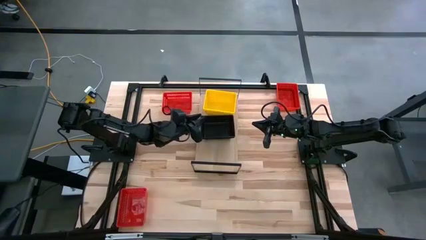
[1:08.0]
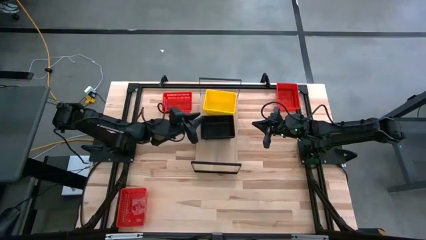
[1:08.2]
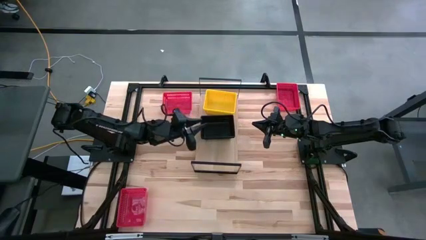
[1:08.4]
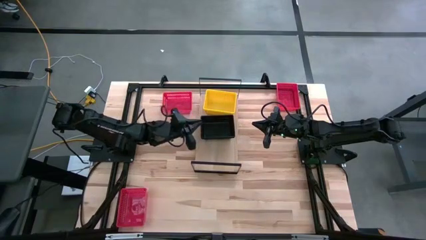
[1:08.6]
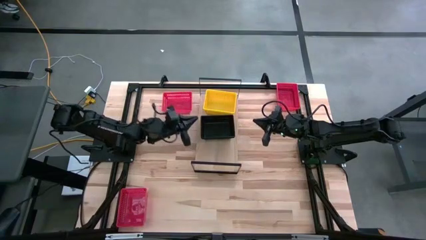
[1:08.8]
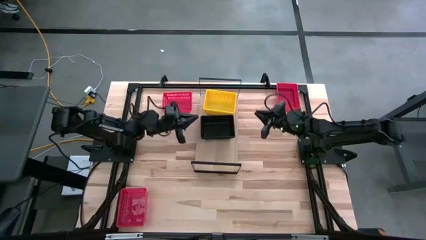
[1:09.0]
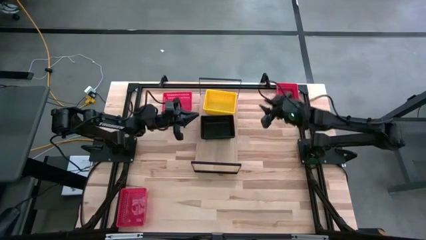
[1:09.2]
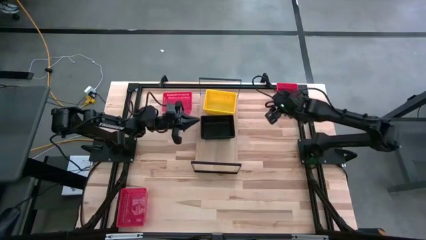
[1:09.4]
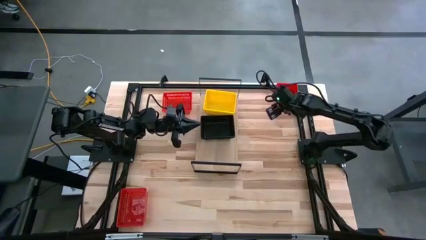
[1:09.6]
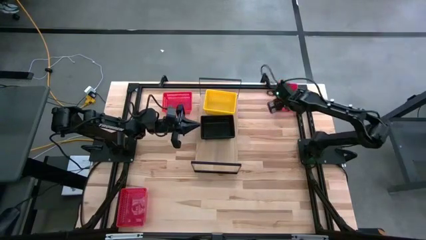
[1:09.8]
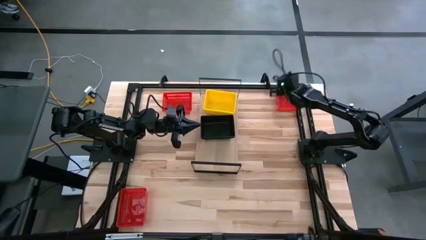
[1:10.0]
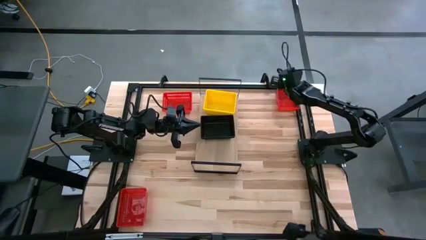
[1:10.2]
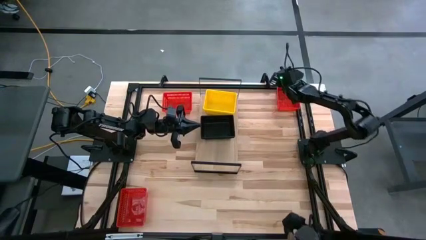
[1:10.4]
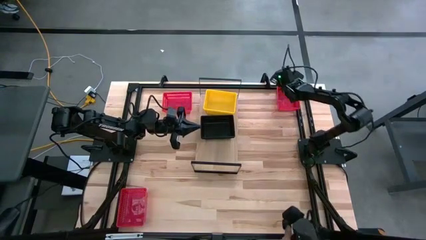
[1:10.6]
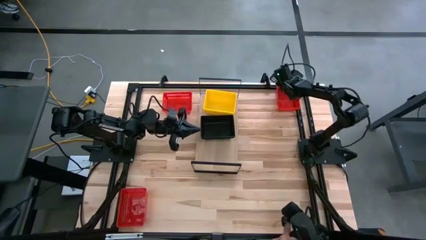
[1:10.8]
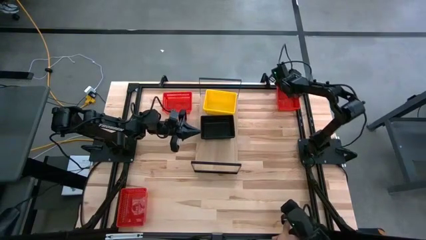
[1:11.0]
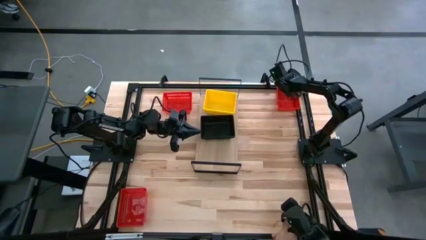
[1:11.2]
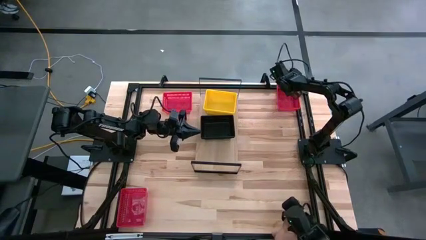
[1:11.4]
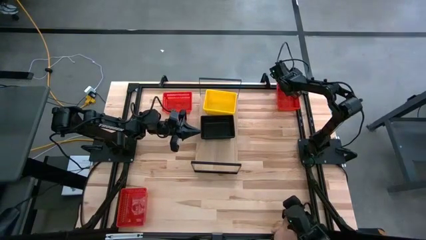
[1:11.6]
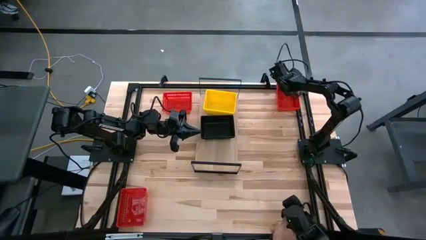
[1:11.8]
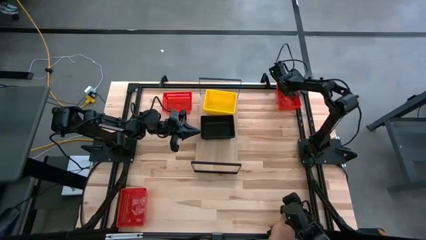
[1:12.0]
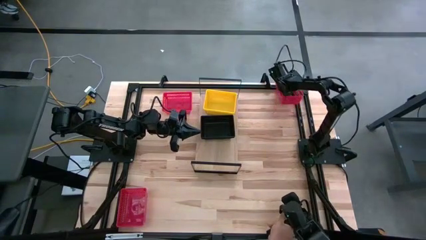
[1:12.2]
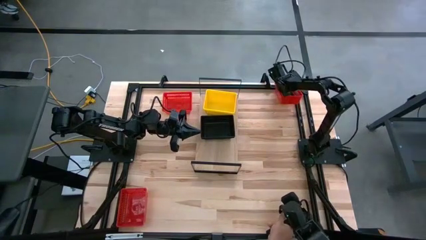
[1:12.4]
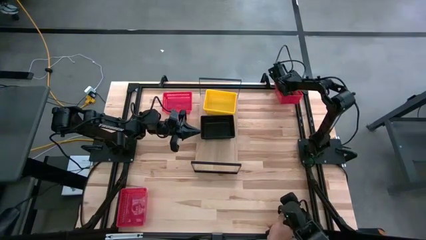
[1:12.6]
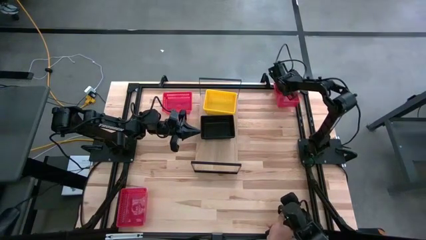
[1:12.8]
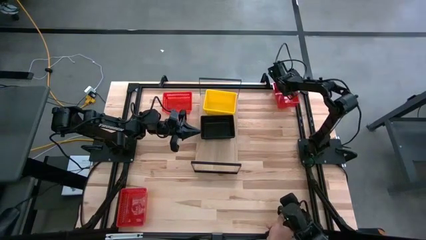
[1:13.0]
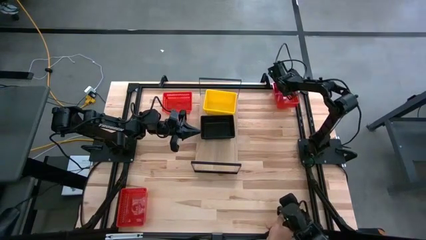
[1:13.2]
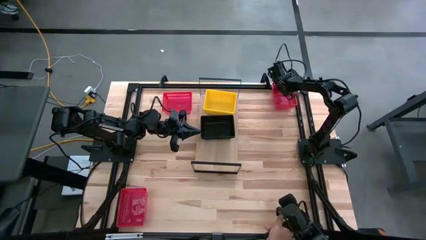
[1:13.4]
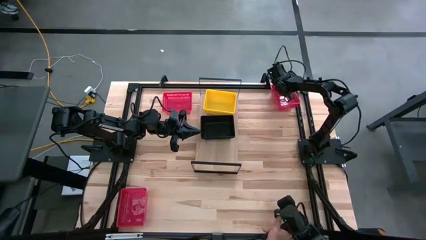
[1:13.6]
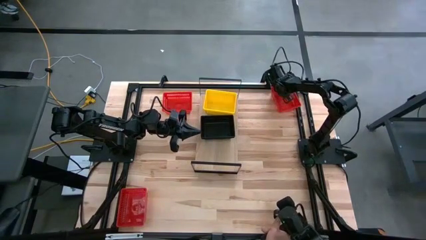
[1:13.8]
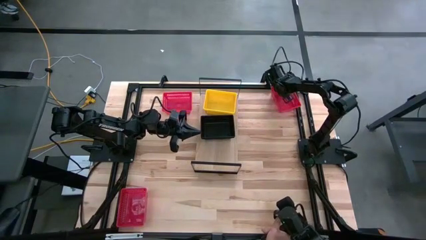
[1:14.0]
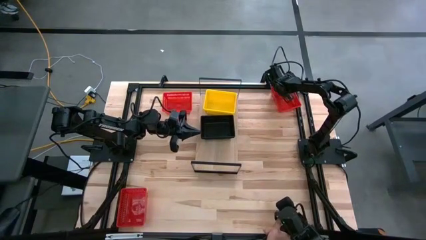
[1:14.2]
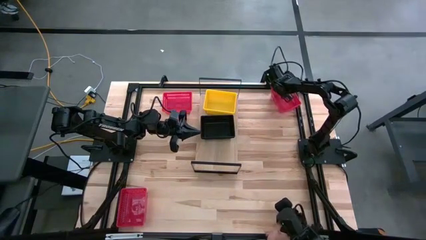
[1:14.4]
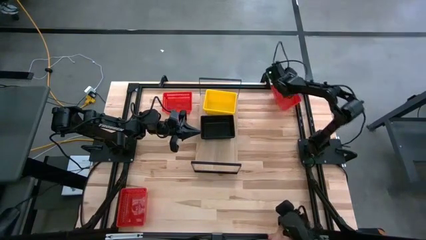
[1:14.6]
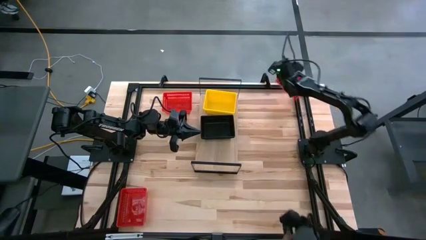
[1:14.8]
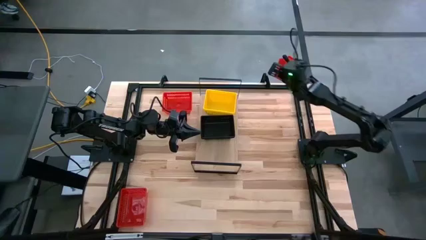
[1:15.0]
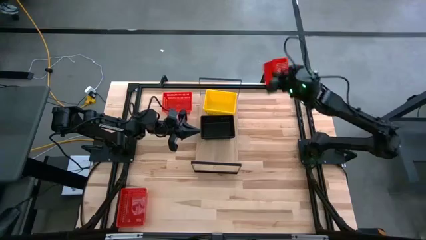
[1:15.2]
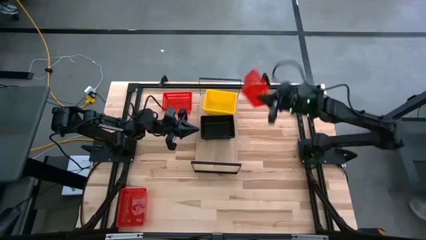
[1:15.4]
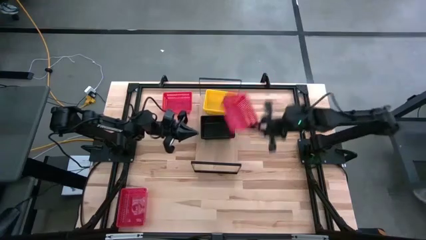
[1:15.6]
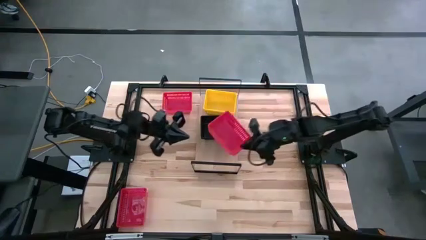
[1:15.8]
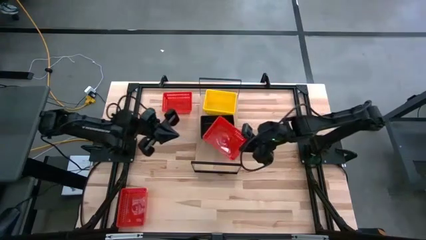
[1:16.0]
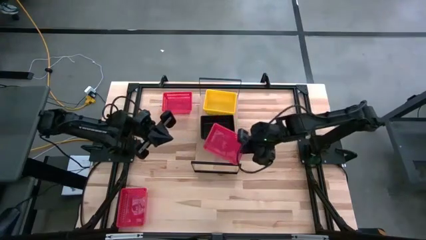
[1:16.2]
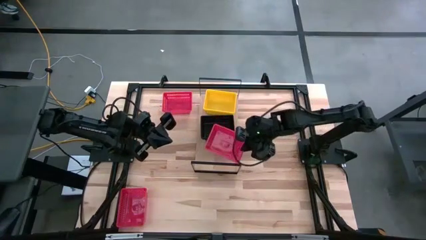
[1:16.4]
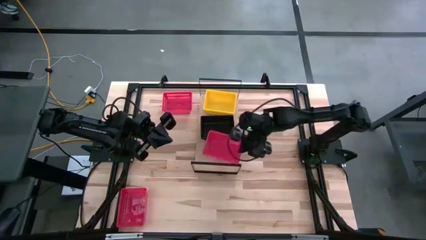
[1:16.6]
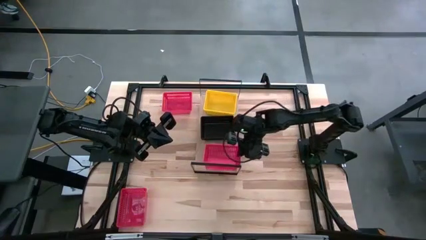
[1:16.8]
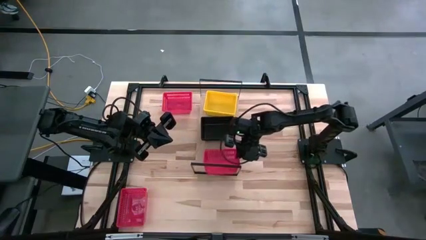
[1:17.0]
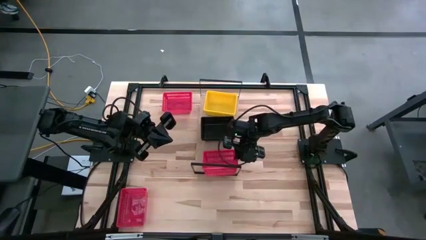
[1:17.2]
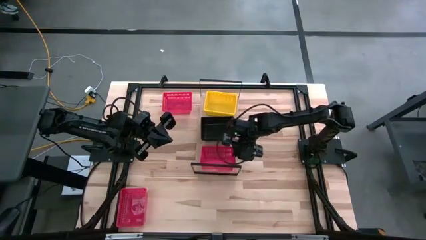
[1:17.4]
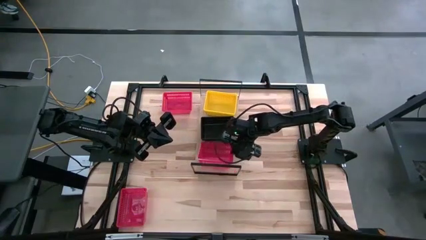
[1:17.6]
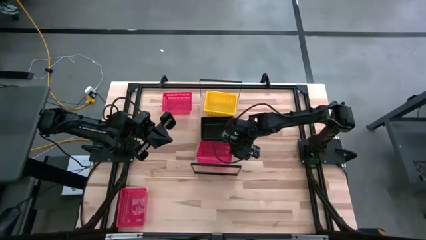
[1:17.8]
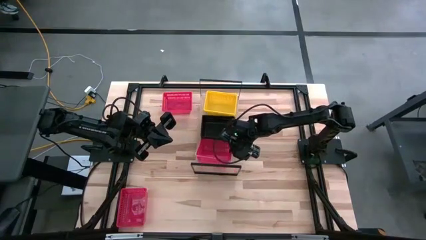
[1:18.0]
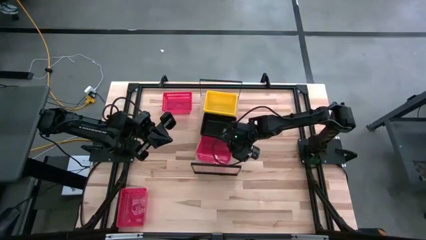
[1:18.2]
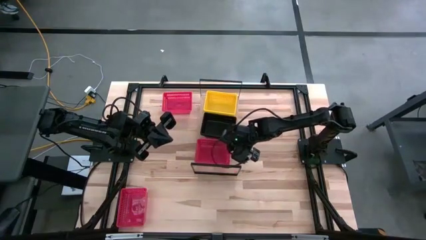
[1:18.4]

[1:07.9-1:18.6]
Task: Stack baskets on shelf by color
Put the top right red bin on the shelf

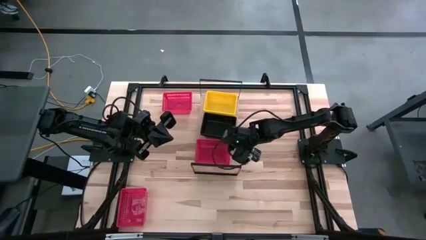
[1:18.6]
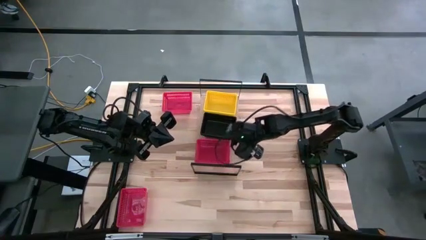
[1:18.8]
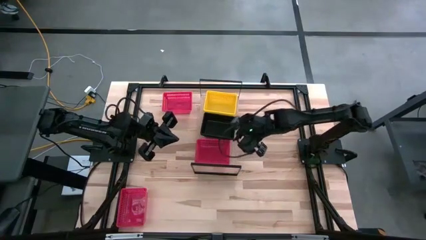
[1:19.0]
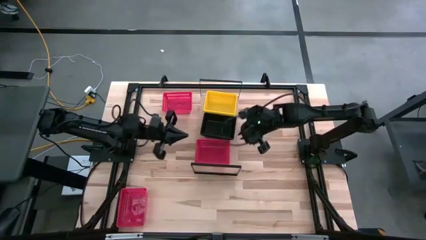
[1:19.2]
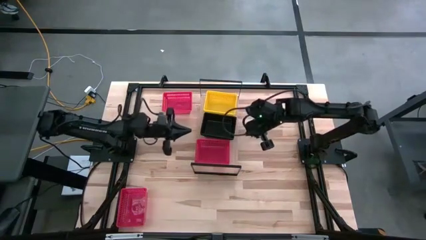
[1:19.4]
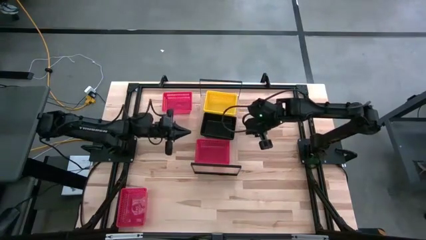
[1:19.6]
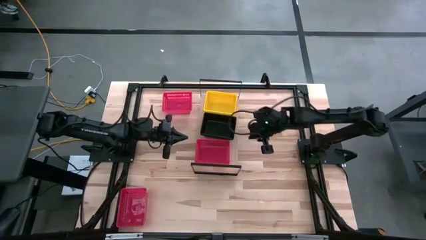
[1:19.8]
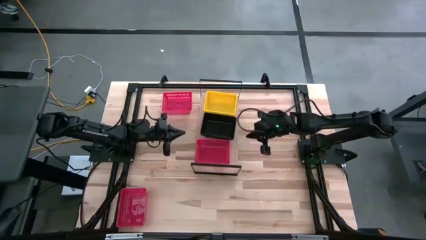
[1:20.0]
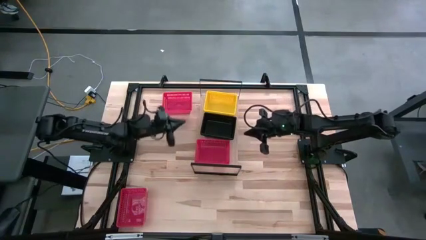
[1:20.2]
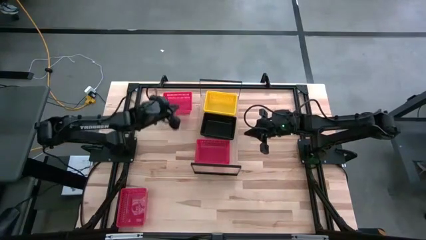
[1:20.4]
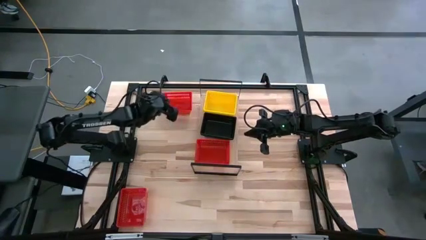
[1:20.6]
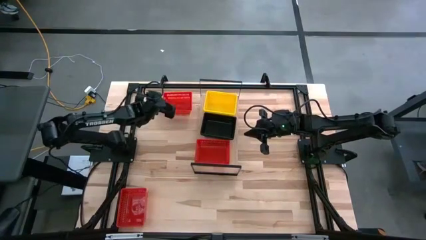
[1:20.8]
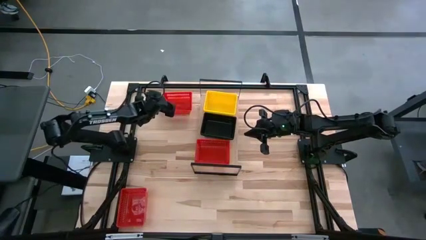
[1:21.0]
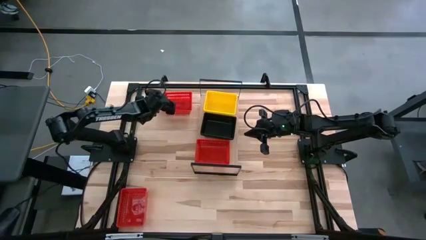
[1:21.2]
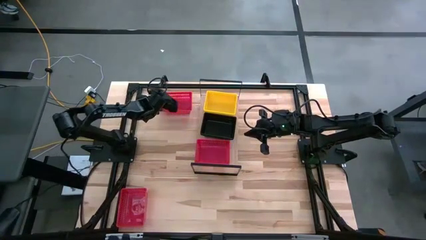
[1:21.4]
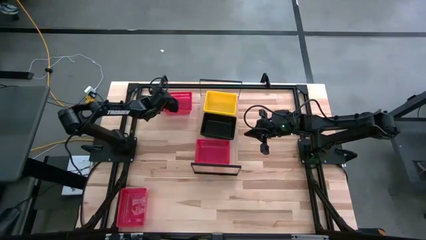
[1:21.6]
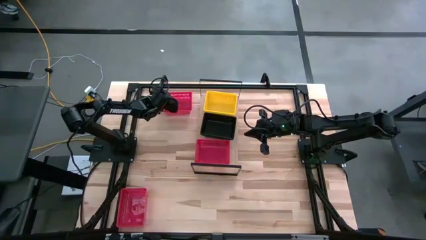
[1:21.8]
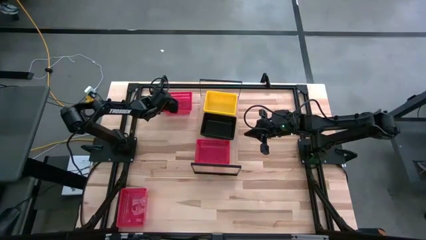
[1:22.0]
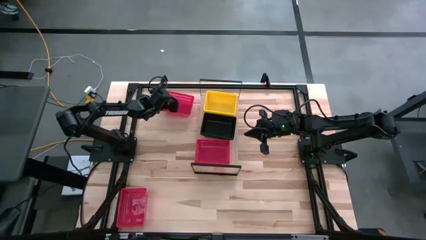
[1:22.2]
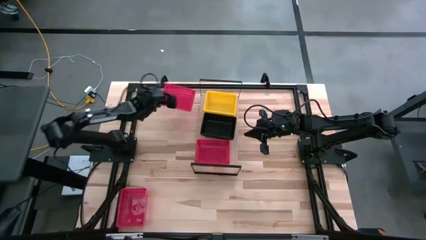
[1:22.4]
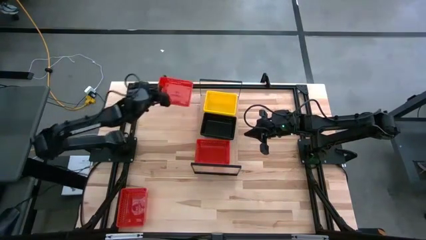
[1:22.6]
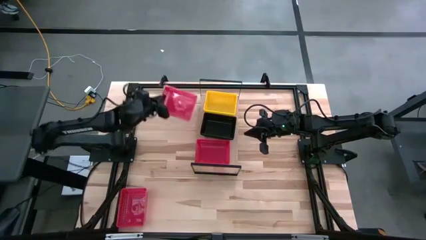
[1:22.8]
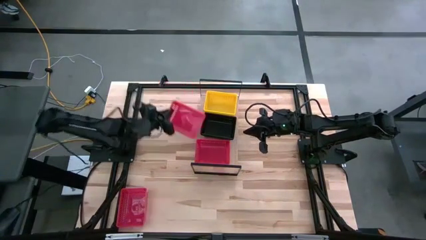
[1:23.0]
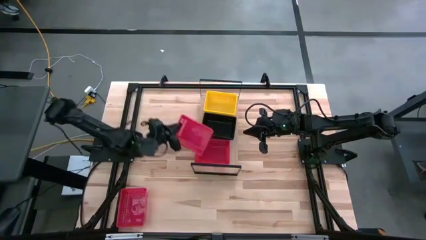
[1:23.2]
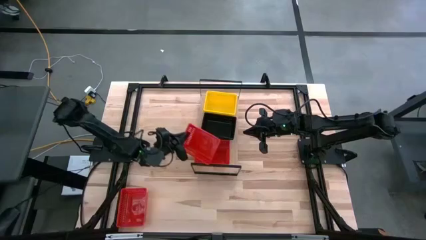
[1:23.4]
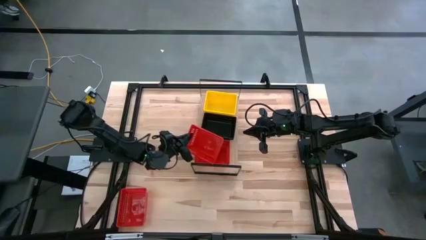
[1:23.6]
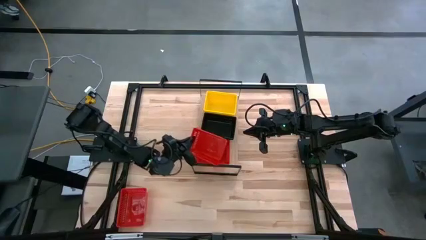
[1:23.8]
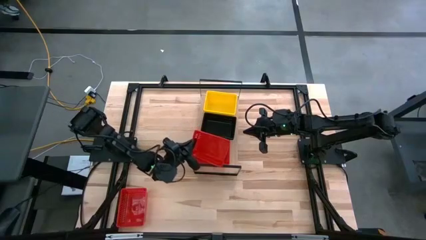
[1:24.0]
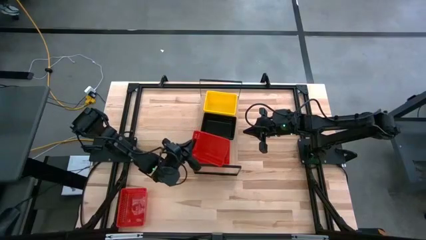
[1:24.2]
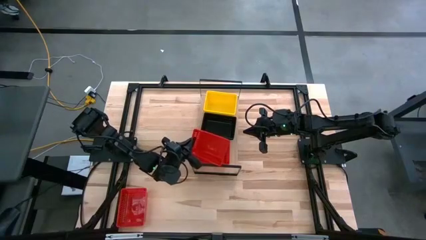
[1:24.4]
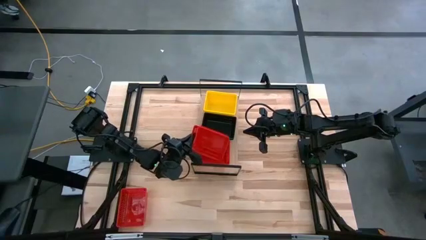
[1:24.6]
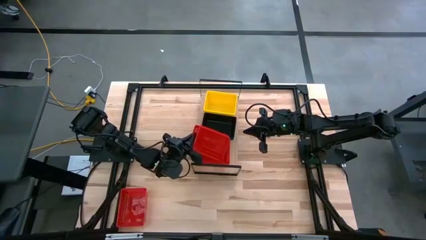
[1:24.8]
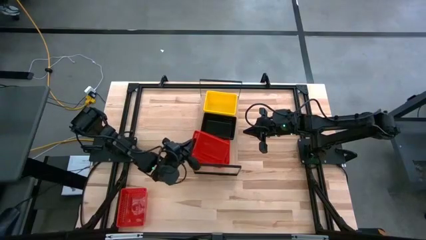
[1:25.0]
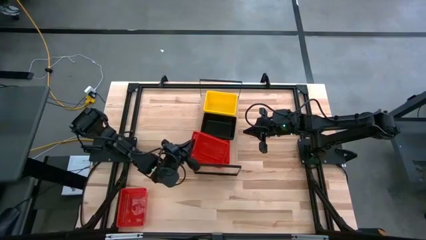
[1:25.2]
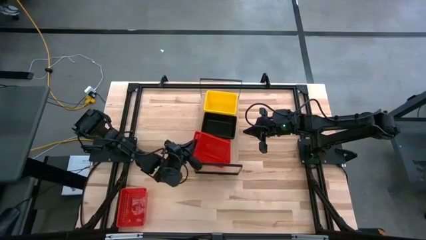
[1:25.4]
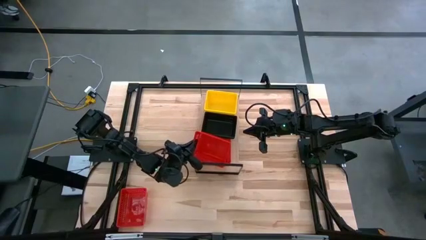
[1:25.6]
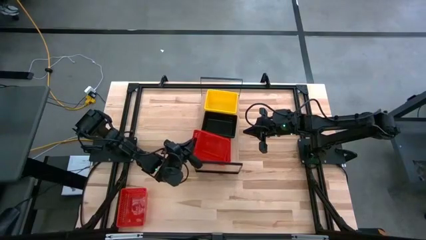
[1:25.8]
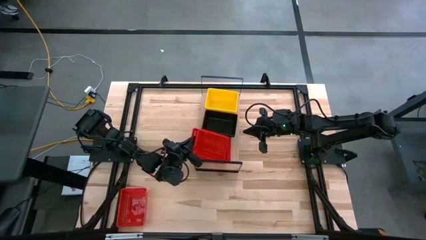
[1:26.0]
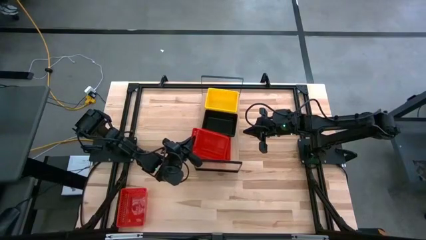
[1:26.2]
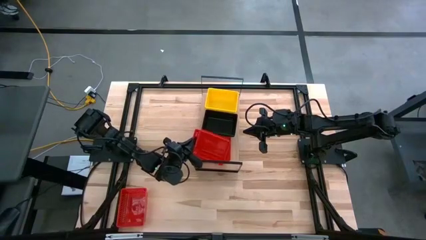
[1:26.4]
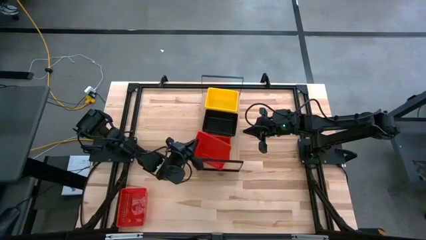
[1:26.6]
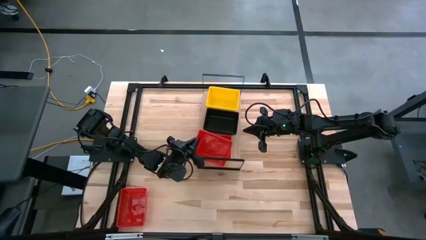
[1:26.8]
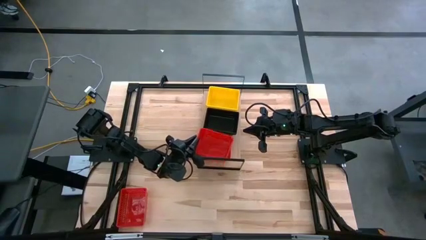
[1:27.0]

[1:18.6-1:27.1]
Stack the top red bin on the red bin on the shelf
